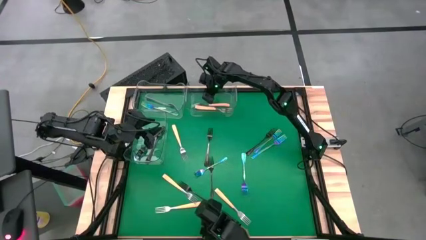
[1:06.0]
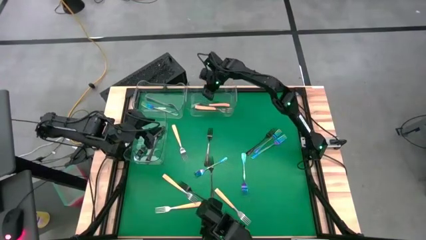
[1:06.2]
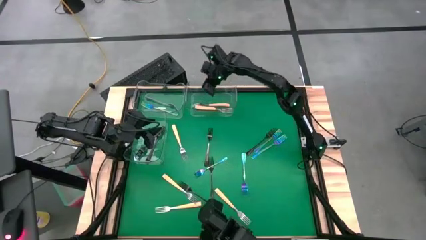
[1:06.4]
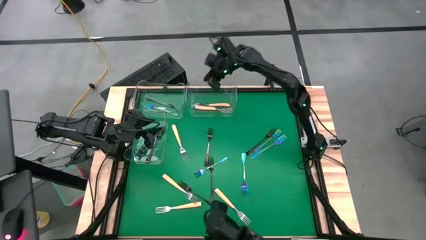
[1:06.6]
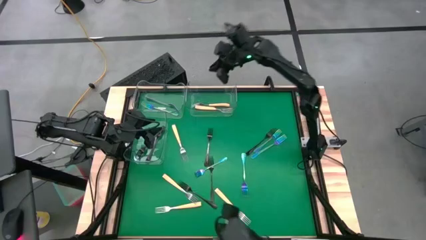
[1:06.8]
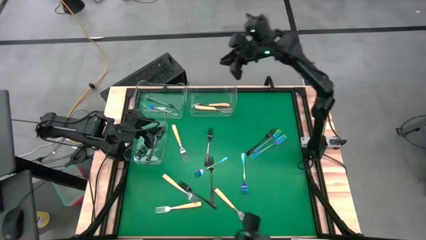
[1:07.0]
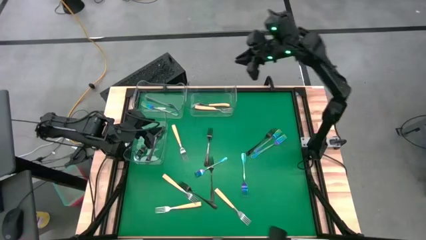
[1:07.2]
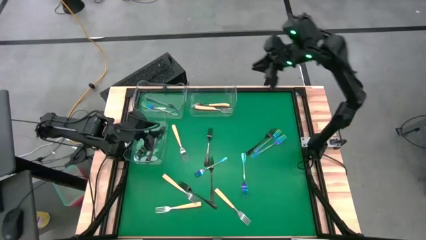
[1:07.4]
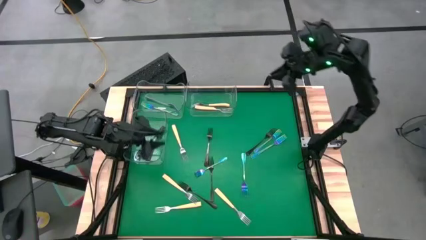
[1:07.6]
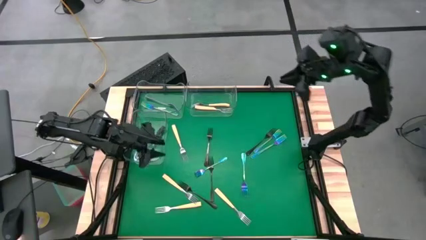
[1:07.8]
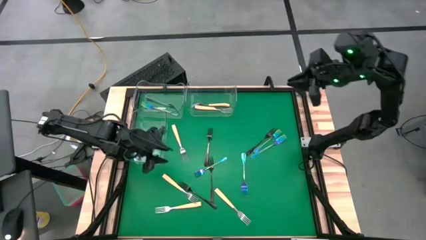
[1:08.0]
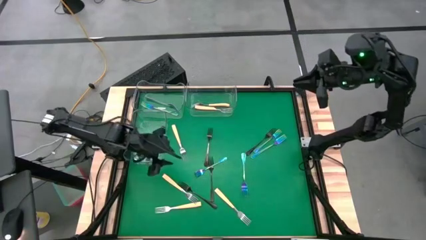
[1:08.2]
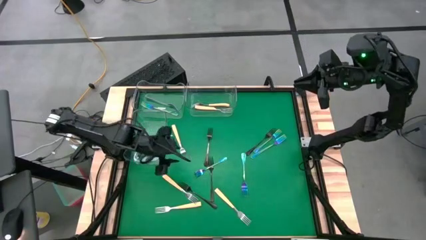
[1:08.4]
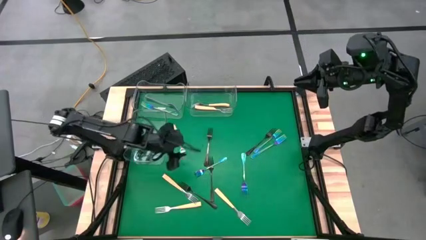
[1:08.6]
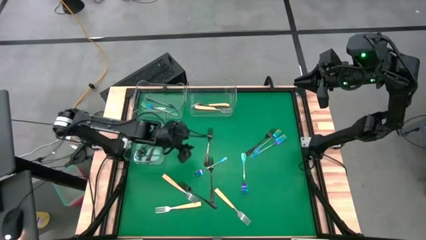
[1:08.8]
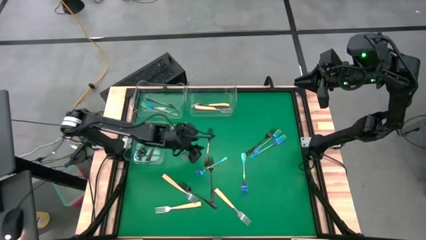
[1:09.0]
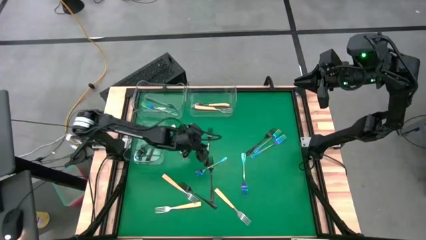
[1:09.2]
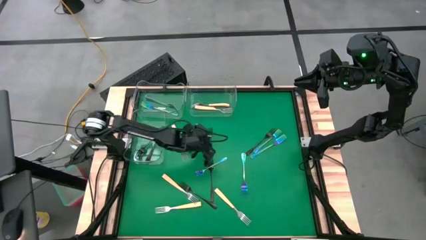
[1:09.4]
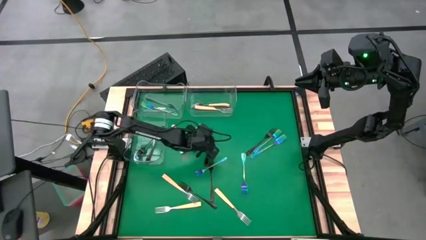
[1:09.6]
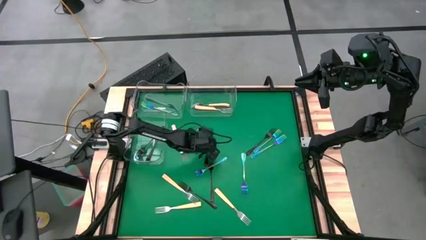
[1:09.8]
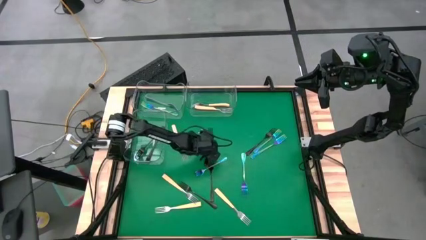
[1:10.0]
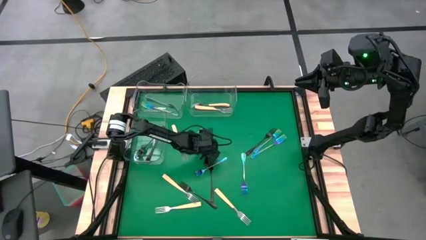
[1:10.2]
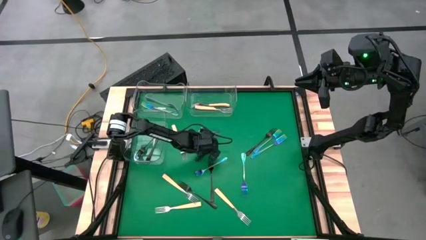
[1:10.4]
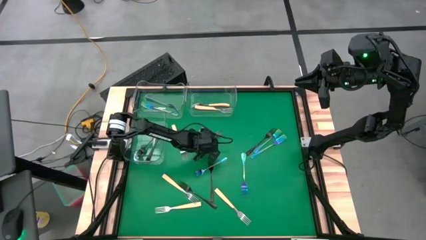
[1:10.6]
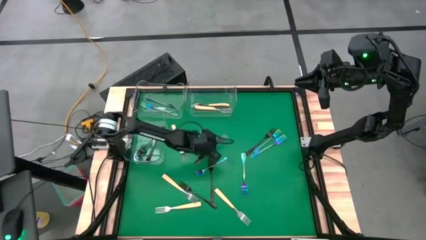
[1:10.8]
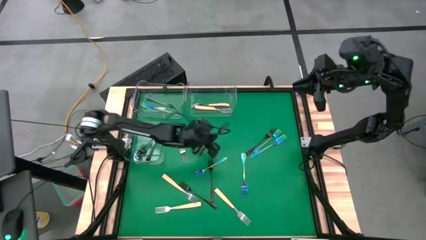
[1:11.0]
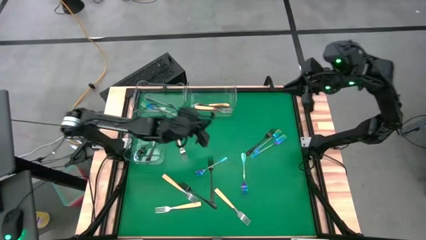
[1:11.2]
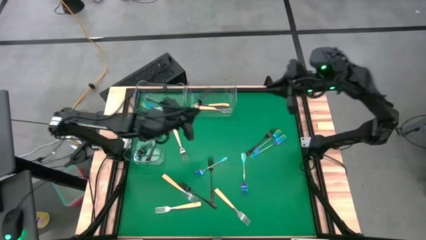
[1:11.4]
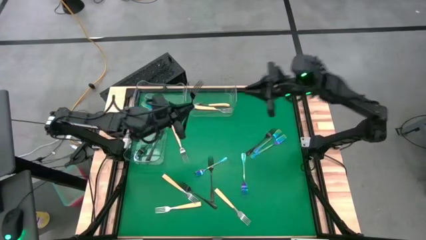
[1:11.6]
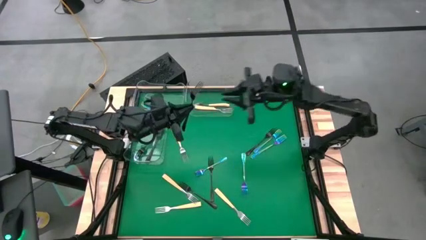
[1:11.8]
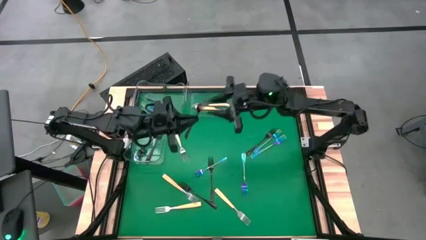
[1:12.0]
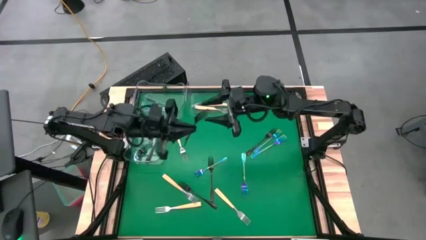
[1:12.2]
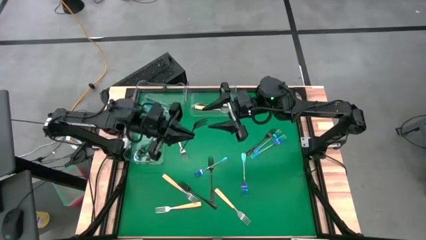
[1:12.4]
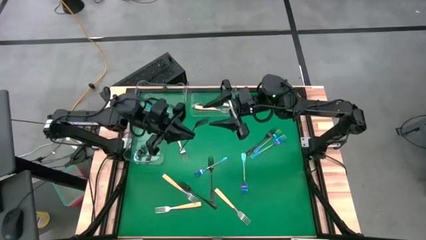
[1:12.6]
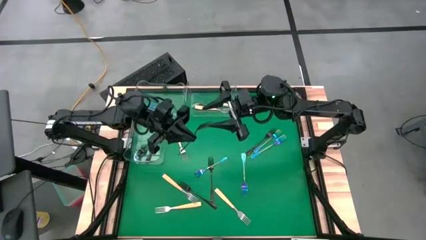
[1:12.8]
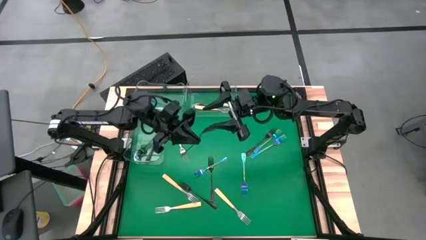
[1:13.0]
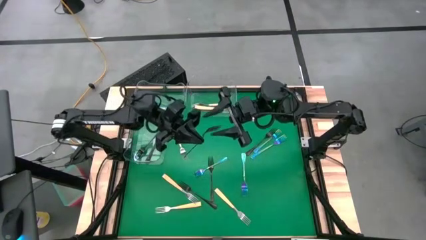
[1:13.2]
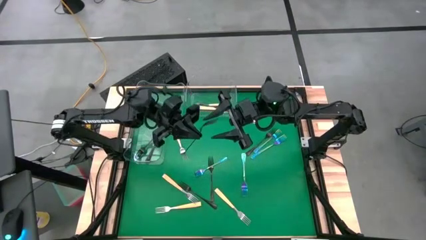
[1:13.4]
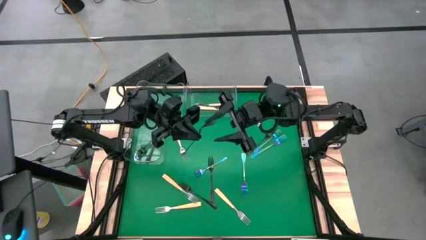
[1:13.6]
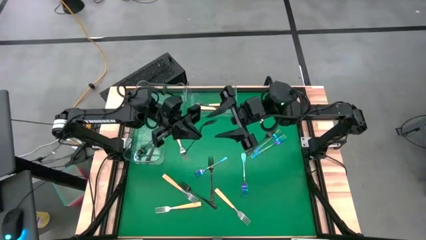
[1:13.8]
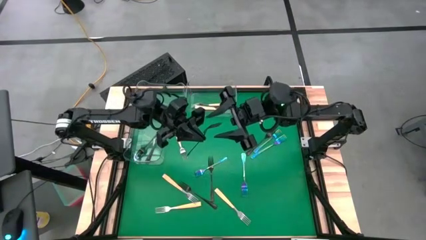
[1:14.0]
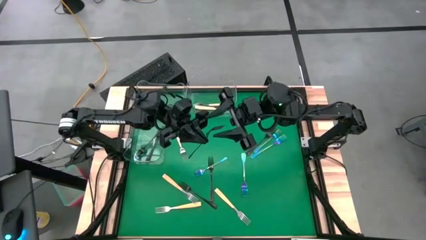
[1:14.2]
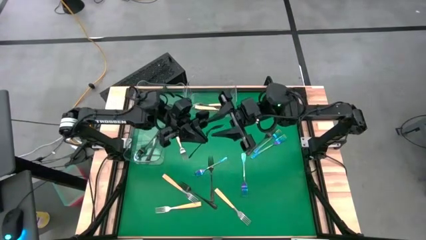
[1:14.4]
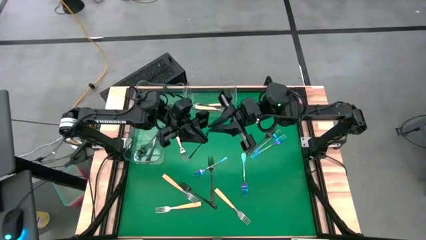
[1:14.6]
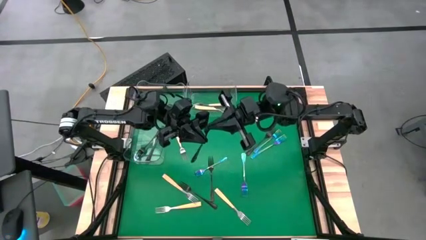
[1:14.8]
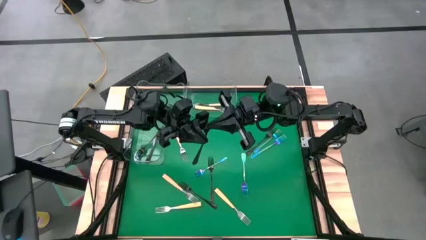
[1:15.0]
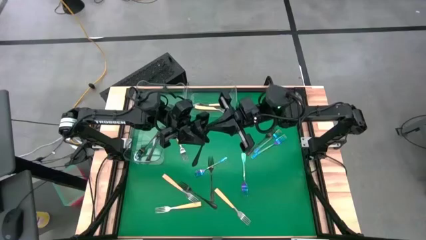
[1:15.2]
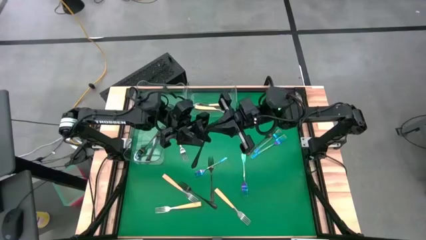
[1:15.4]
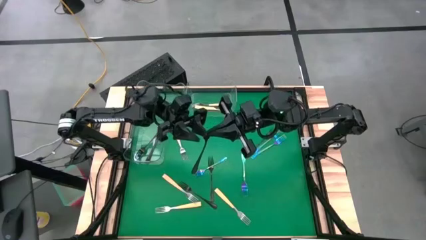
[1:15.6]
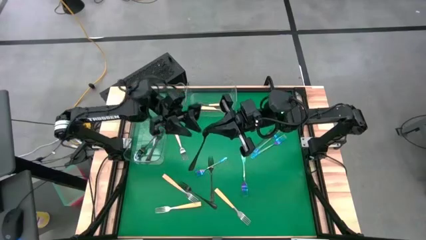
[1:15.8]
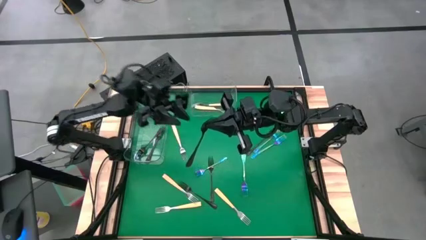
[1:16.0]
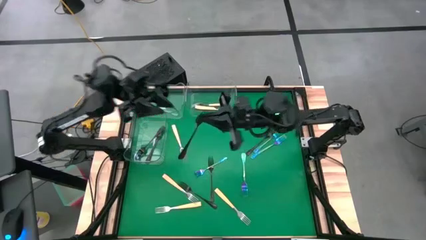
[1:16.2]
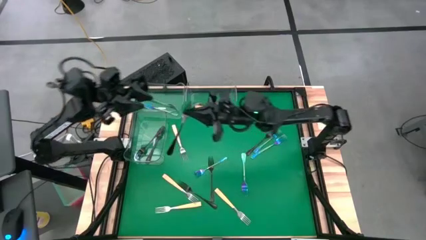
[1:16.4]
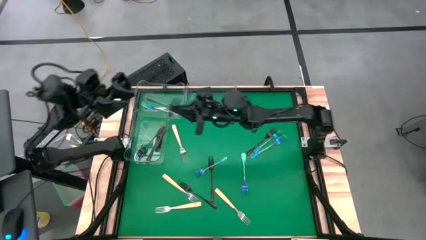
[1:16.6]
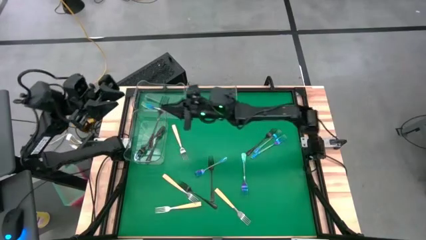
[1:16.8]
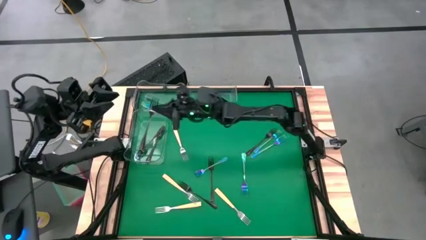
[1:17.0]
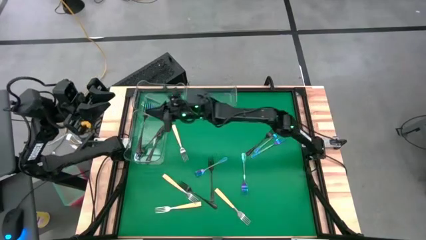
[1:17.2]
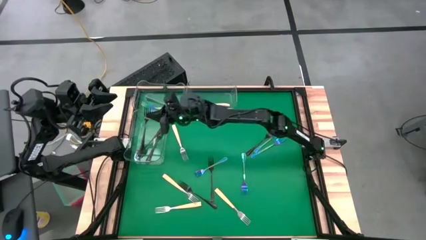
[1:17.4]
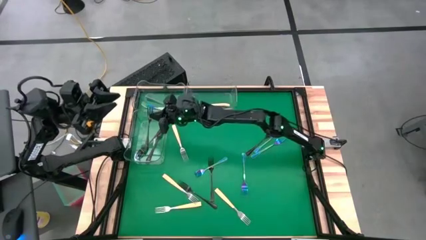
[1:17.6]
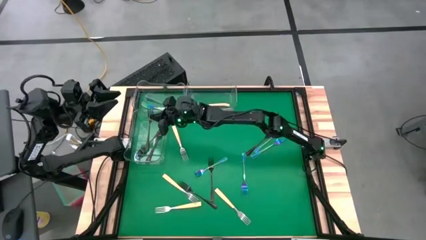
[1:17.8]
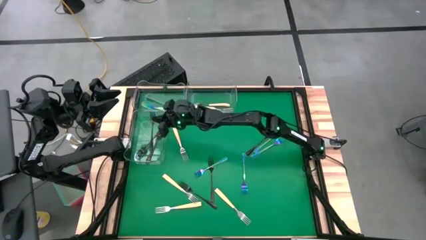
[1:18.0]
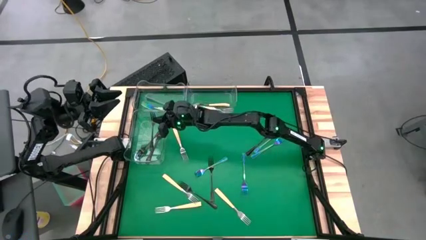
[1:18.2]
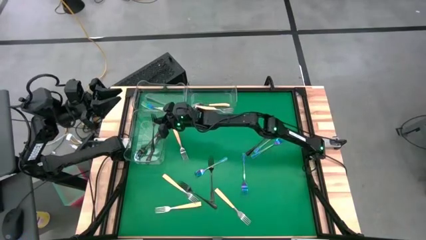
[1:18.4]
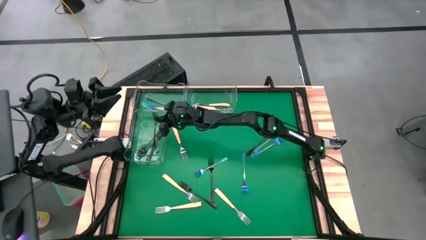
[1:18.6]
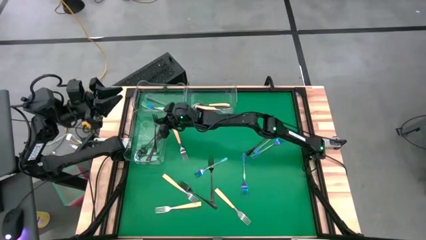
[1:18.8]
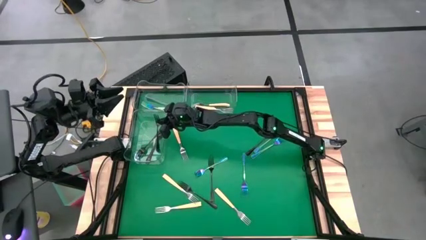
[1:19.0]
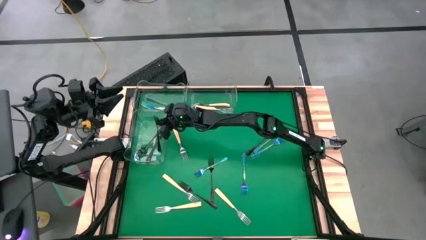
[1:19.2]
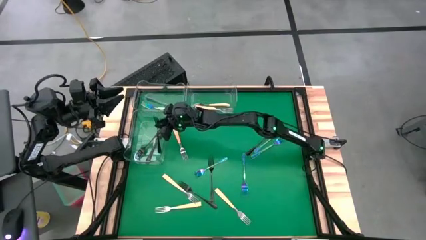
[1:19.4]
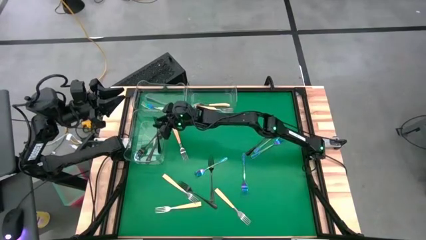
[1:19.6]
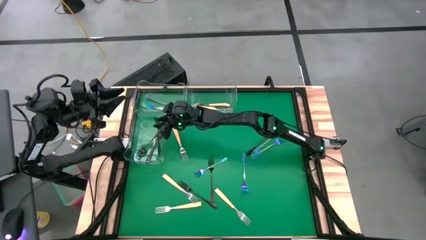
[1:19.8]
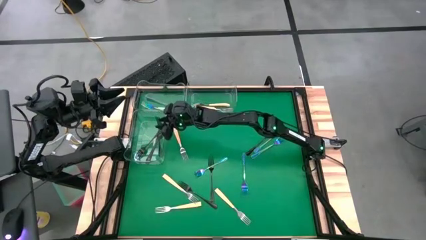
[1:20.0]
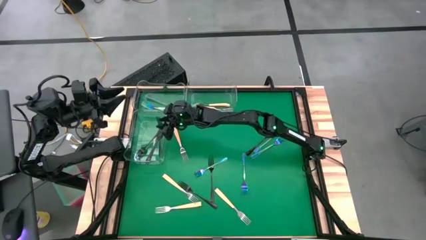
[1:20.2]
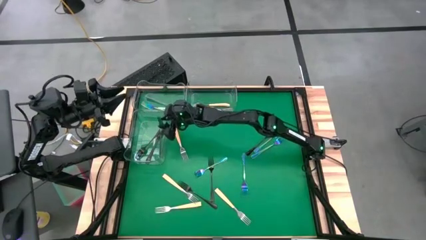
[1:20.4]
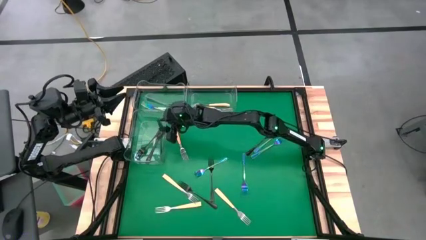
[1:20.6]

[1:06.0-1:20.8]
Task: Sort silverware by color (type)
Put the black fork into the middle left transparent bin
